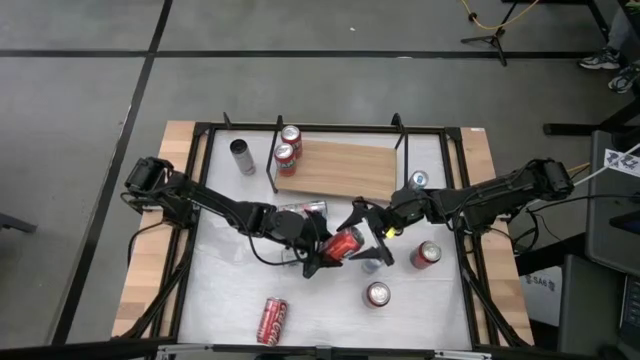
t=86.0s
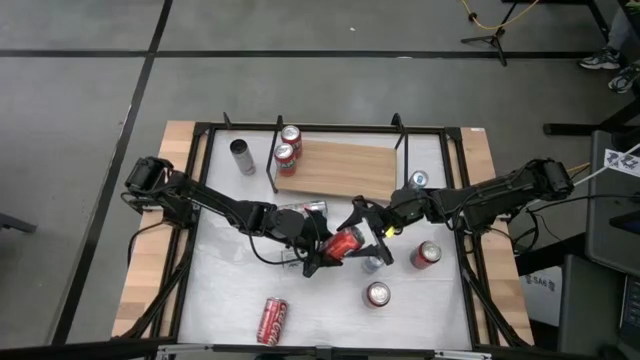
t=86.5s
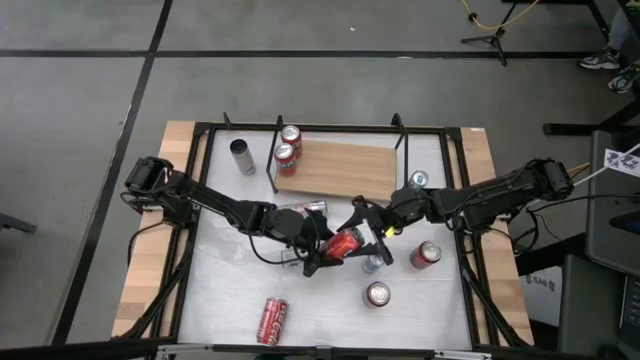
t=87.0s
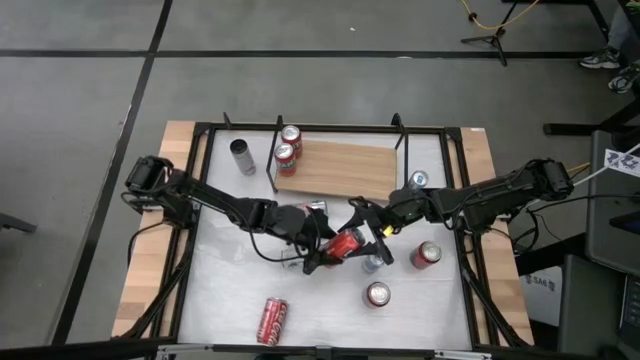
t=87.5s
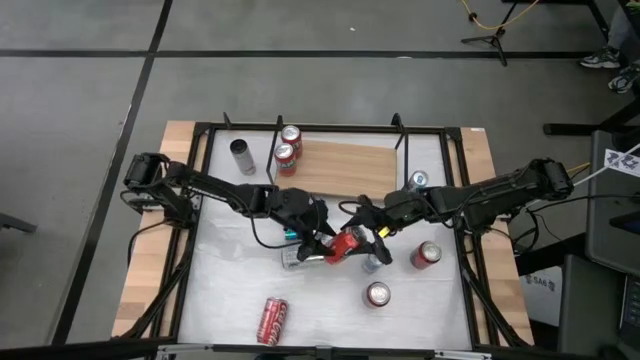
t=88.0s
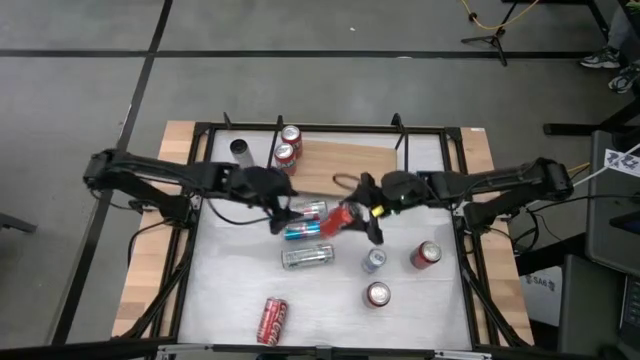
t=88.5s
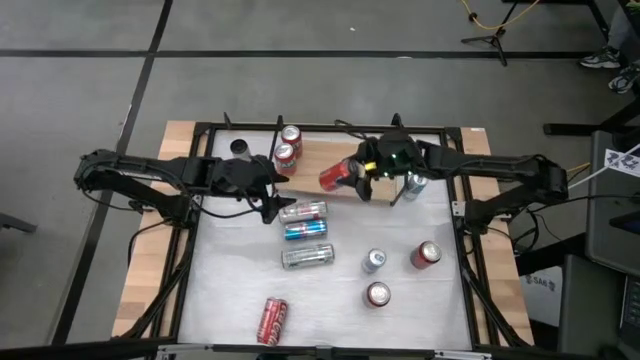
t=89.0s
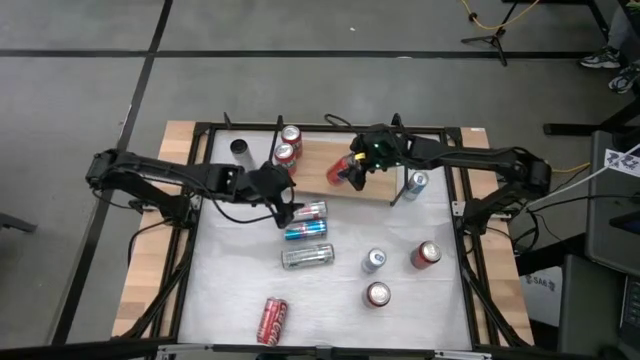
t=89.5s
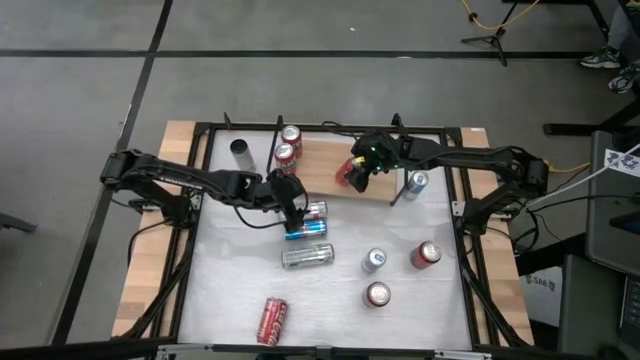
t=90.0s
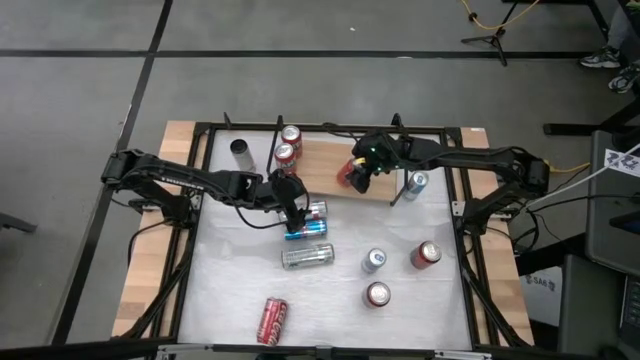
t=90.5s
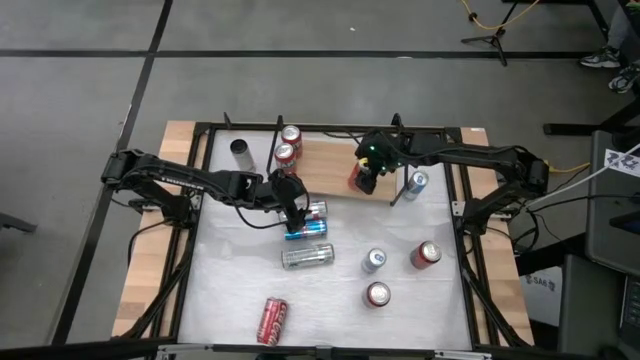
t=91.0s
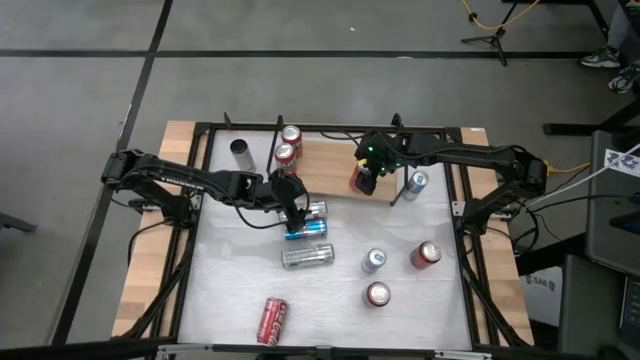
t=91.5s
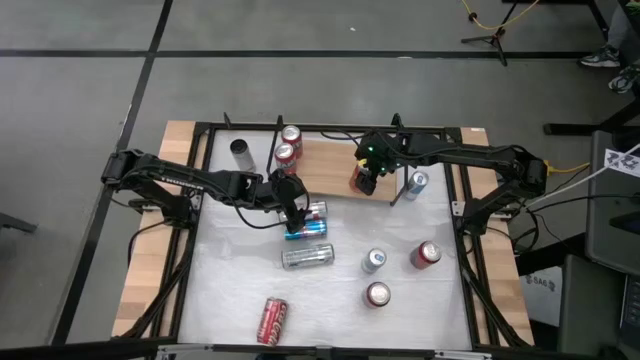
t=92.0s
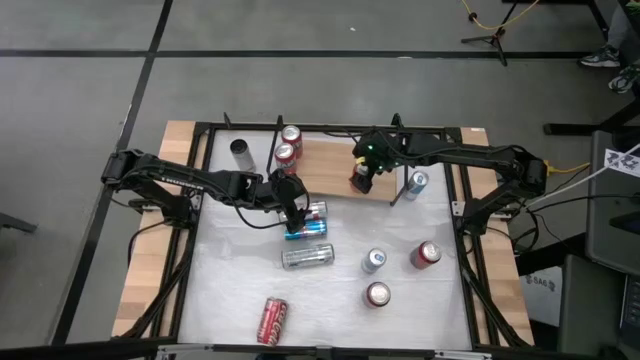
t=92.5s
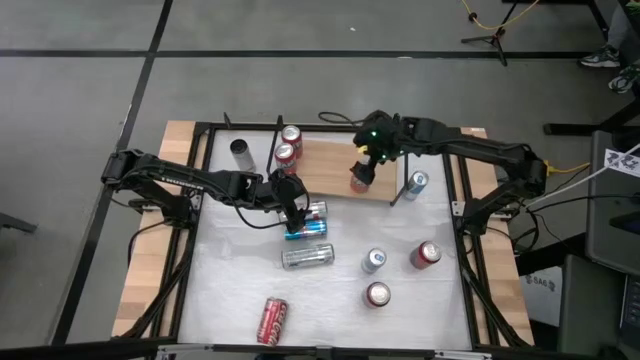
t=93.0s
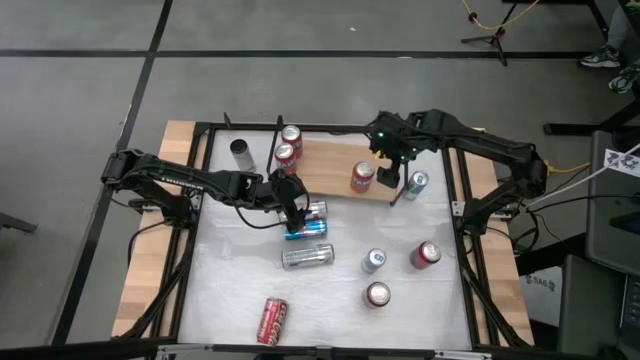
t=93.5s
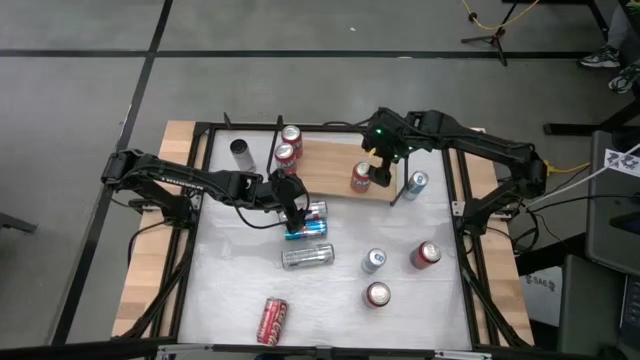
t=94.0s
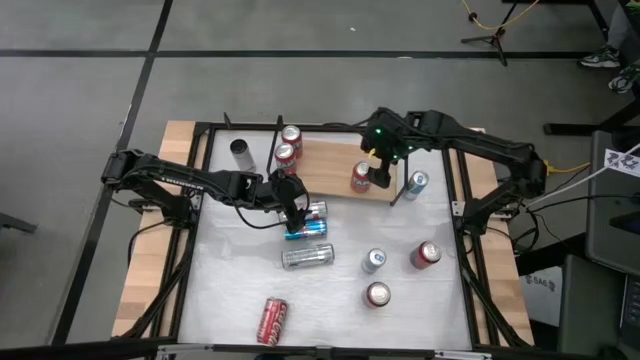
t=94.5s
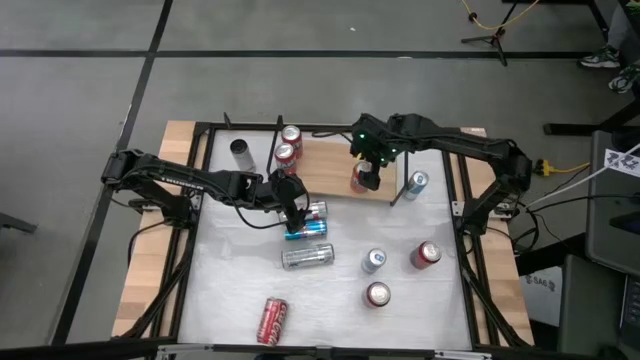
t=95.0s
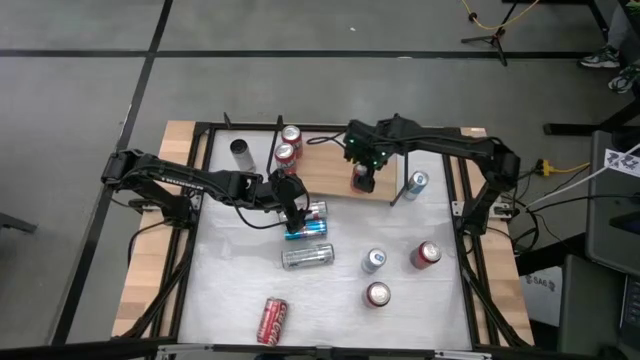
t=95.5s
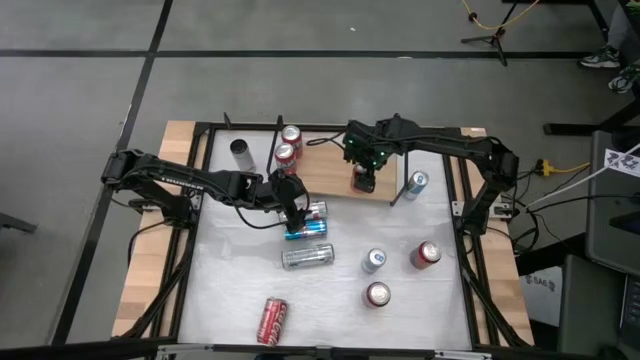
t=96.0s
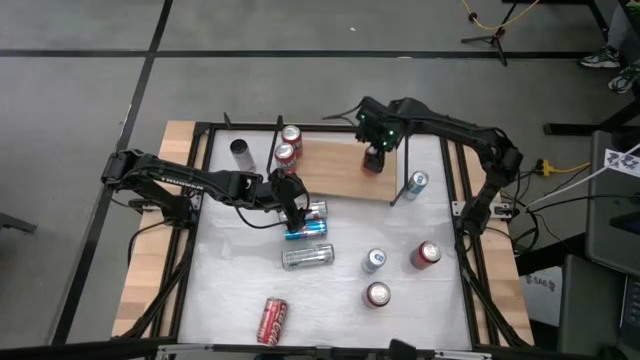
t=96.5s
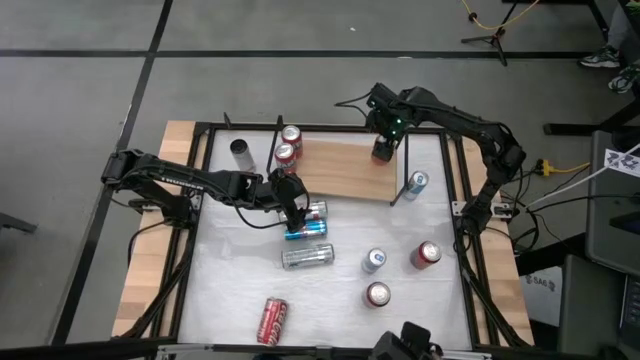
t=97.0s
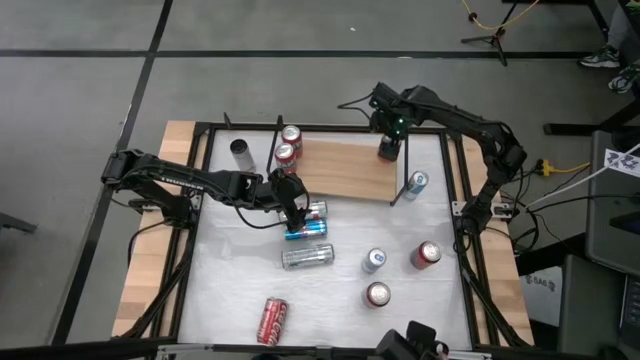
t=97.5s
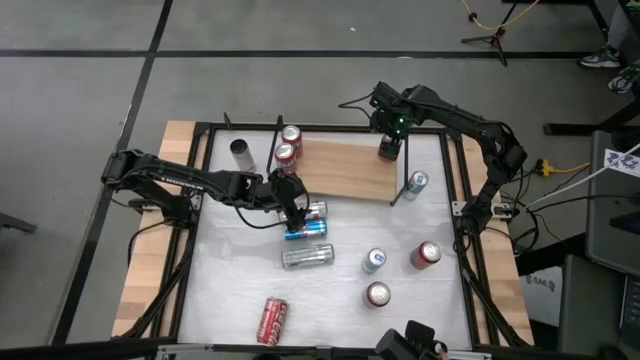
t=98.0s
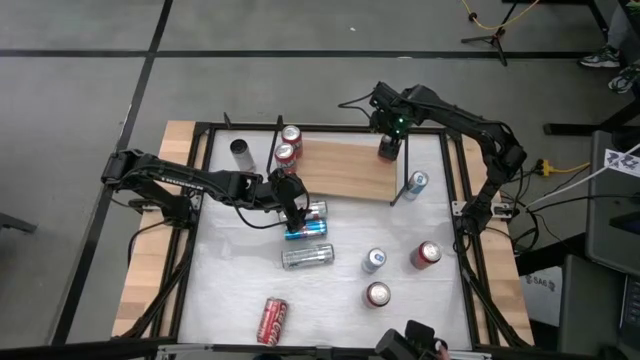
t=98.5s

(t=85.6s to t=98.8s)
Task: Place canned beverage on shelf
Put the red soda can on the shelf

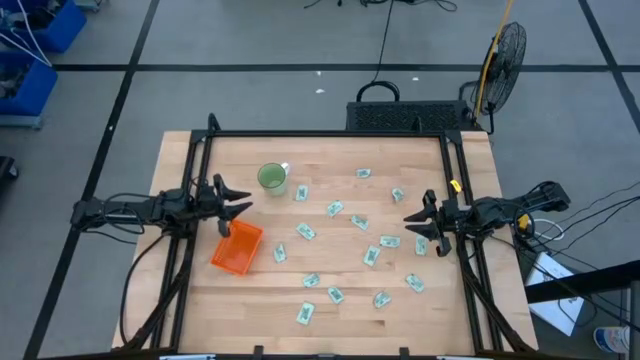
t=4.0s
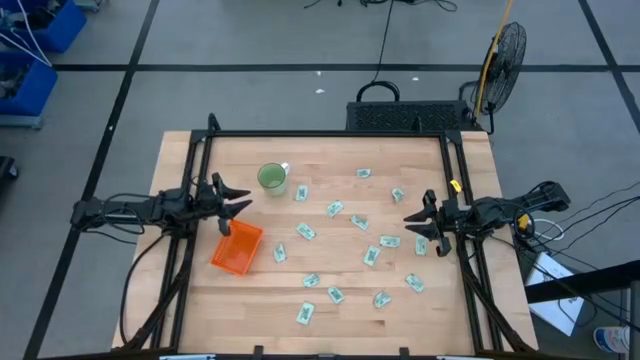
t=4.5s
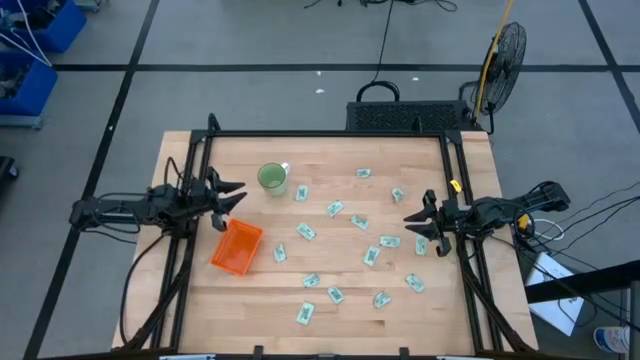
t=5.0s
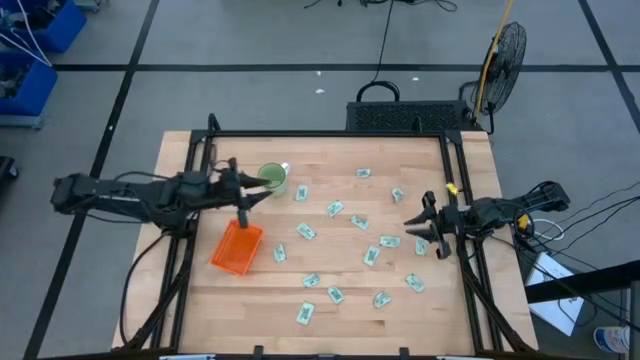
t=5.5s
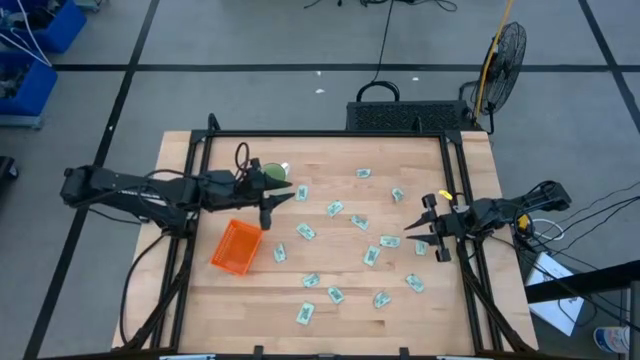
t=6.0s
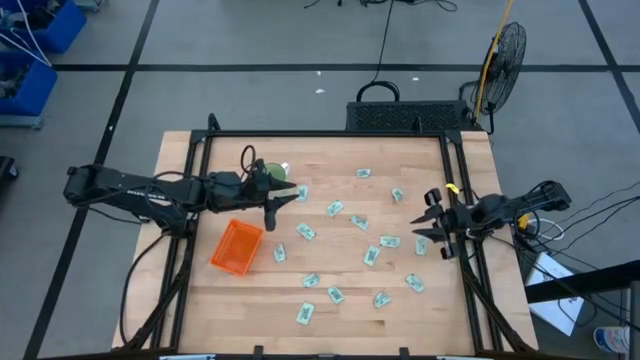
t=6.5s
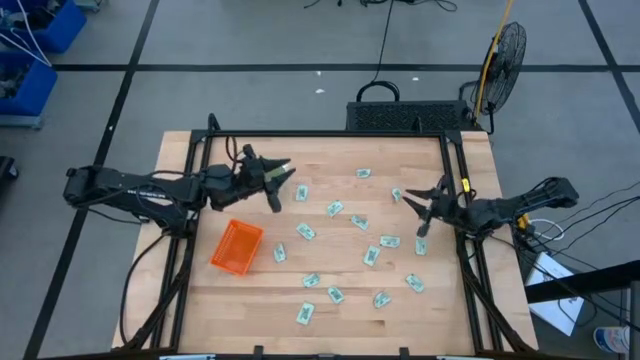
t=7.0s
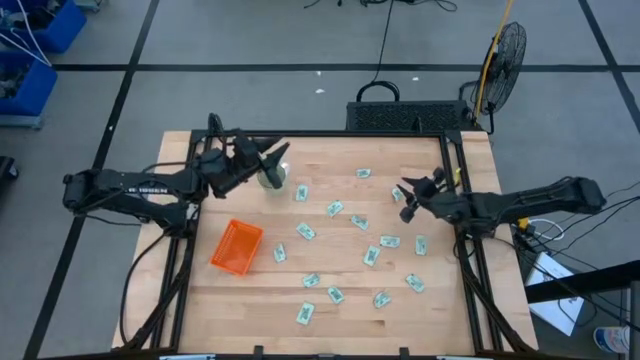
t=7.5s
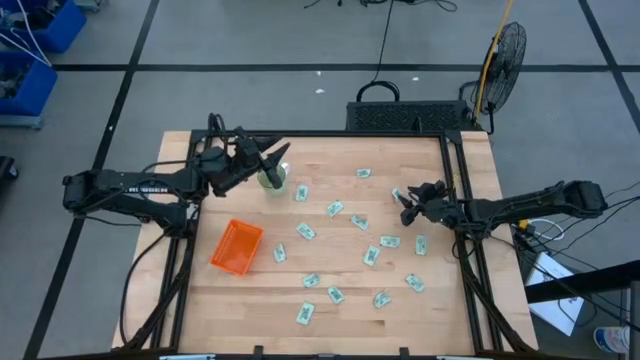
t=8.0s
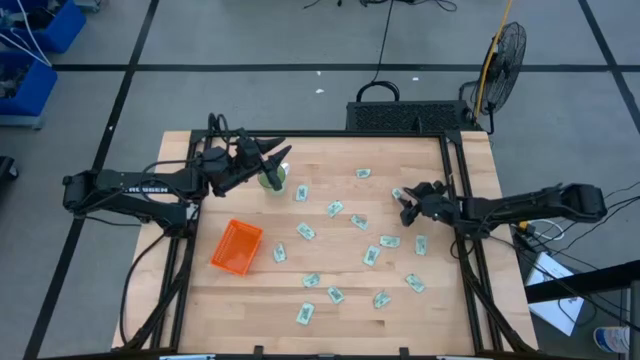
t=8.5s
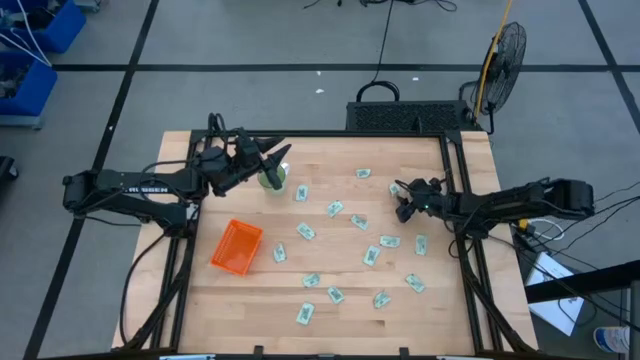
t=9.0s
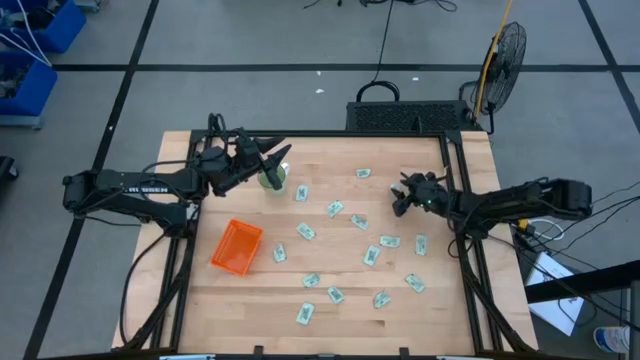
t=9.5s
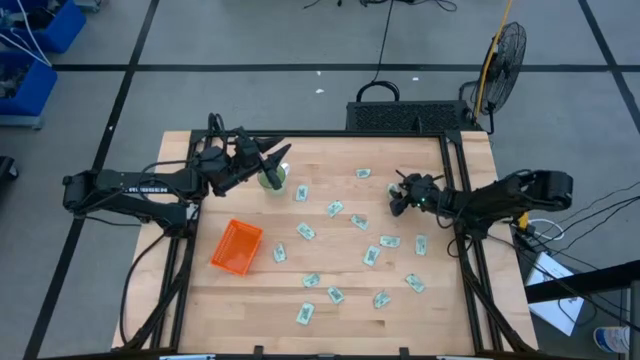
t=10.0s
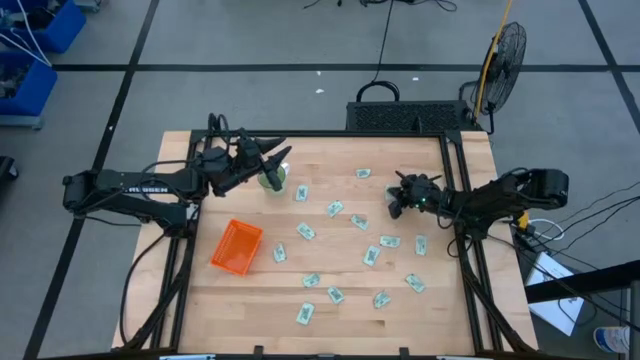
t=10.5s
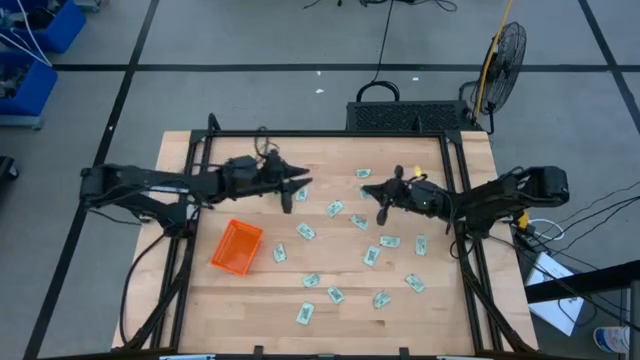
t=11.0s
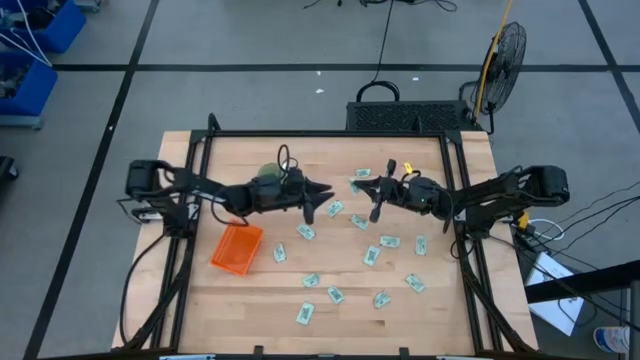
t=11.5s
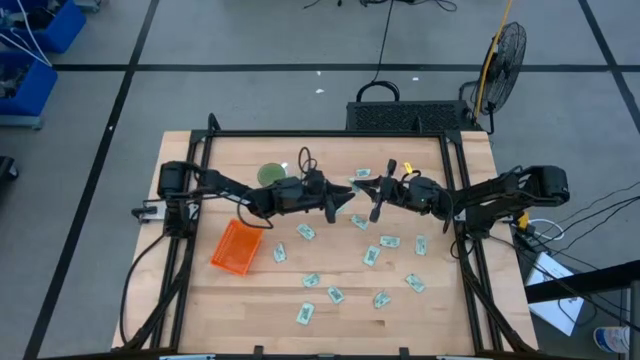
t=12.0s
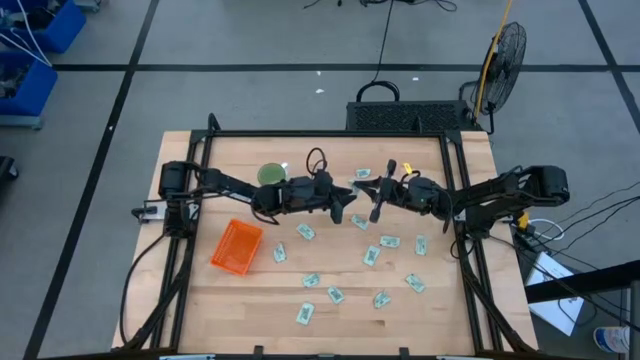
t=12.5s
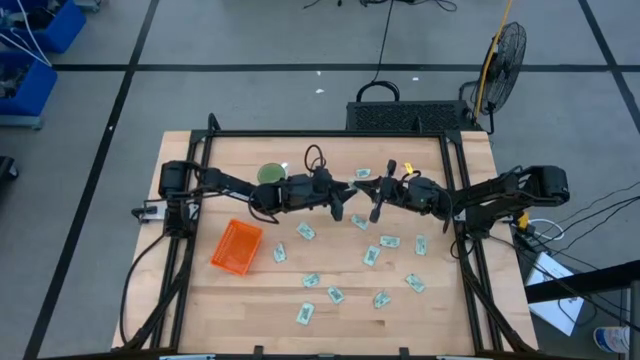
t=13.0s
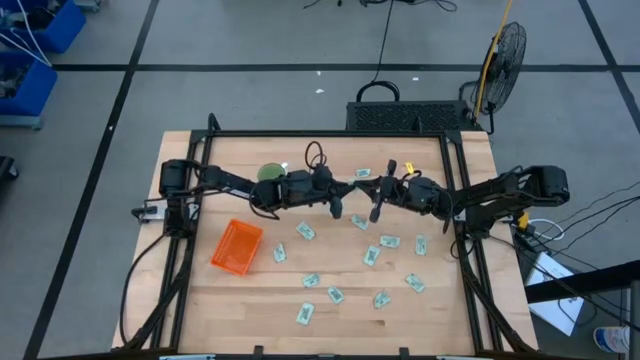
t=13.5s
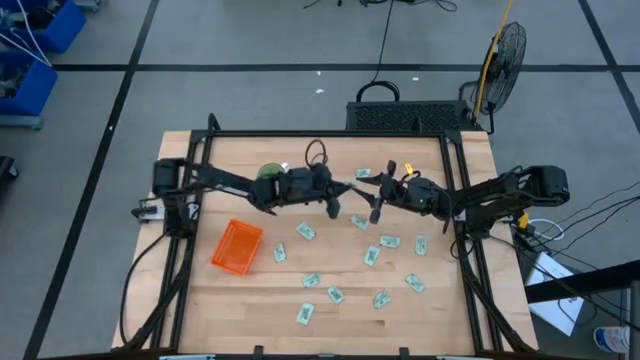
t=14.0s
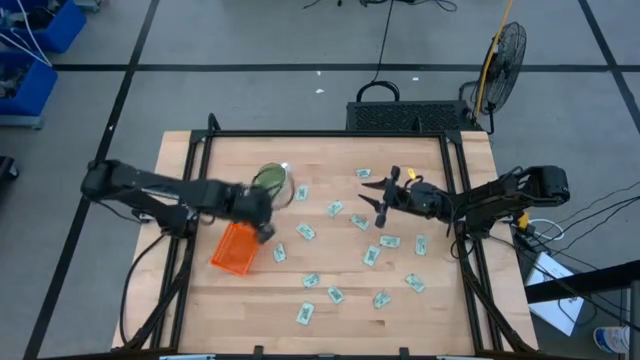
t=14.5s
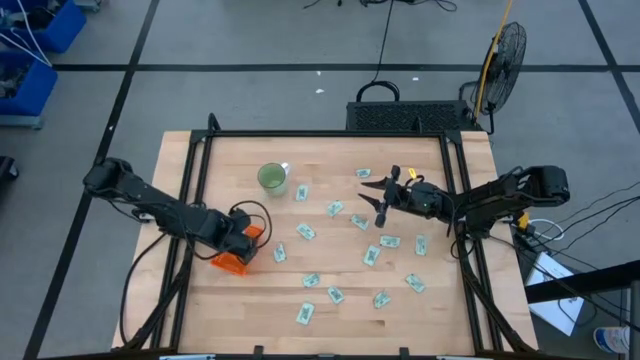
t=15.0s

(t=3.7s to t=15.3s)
Task: Pick and place Stevia / Truvia into bins
Put the stevia packet into the orange bin
